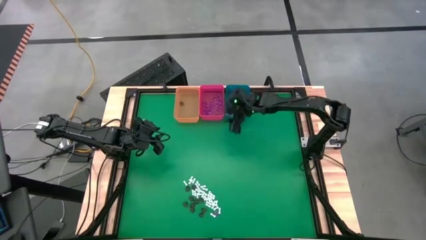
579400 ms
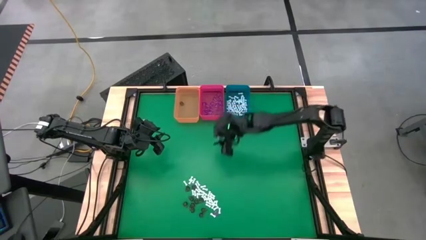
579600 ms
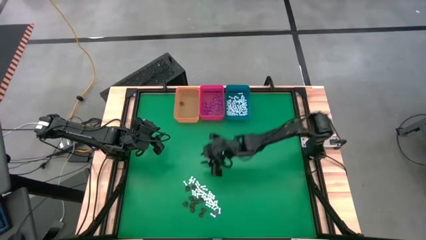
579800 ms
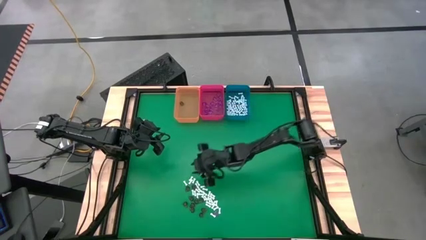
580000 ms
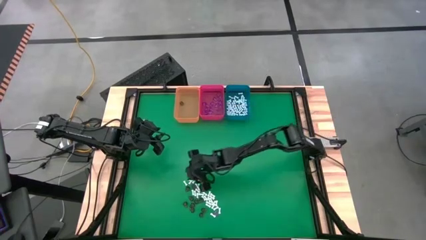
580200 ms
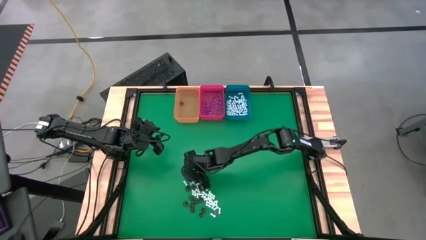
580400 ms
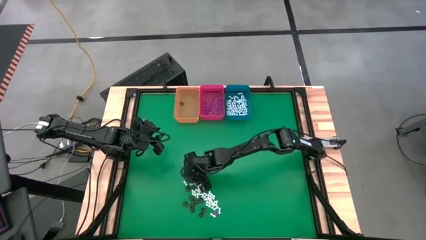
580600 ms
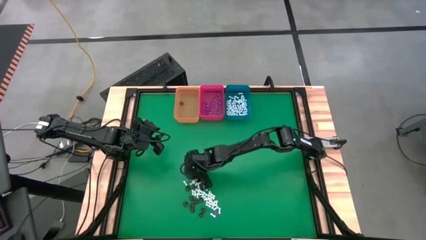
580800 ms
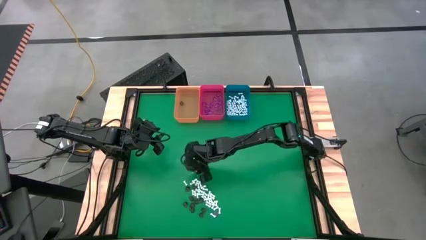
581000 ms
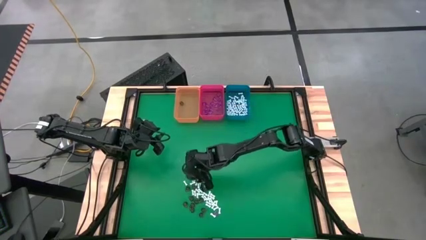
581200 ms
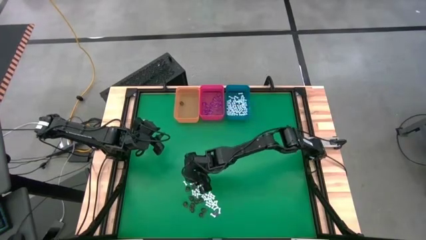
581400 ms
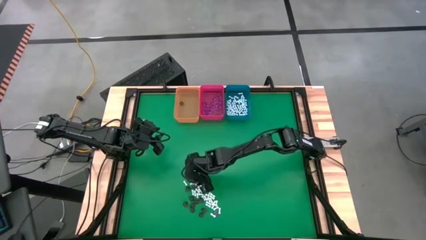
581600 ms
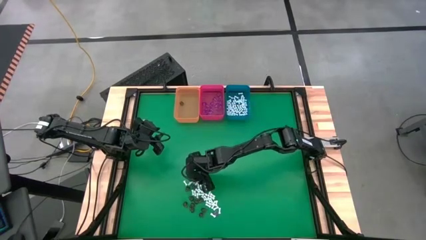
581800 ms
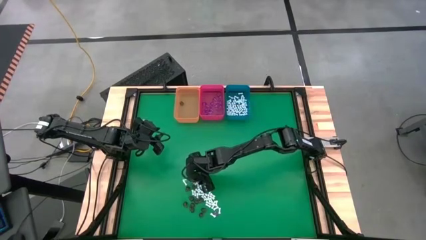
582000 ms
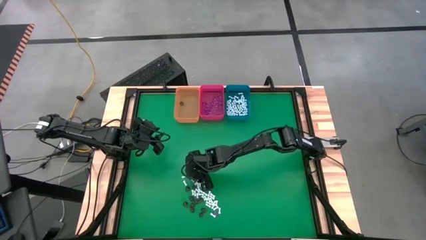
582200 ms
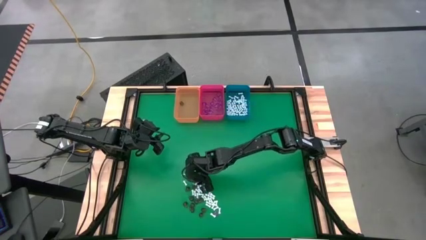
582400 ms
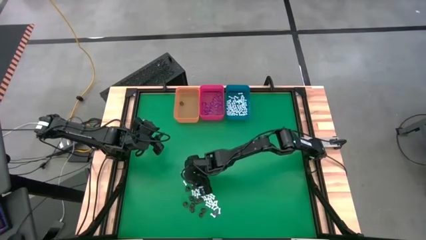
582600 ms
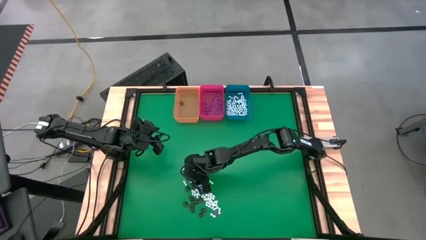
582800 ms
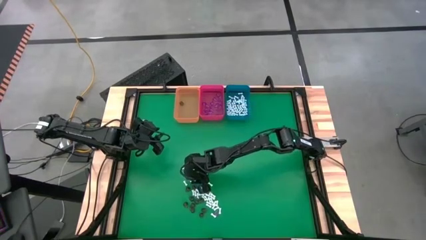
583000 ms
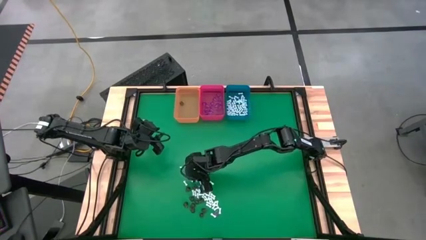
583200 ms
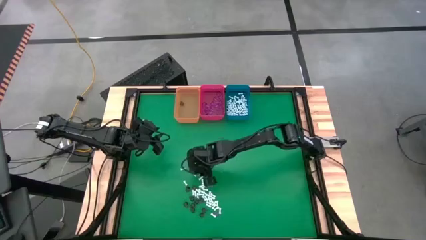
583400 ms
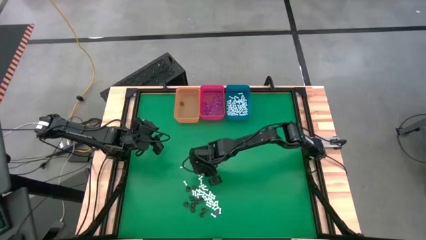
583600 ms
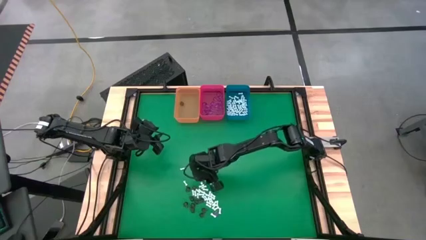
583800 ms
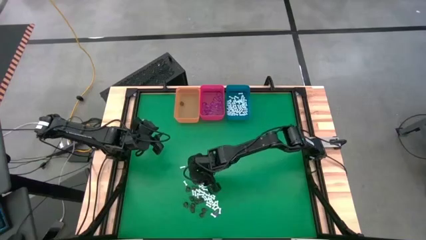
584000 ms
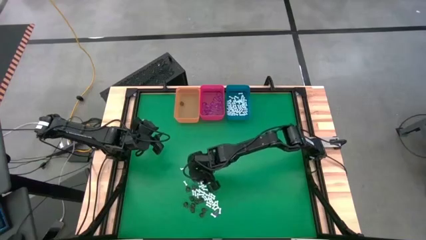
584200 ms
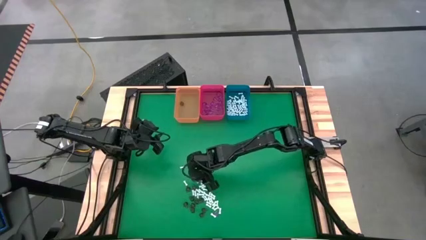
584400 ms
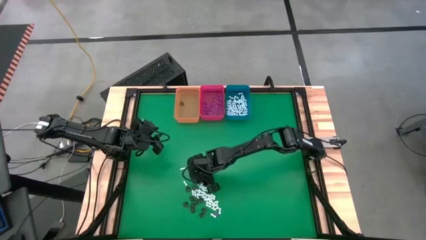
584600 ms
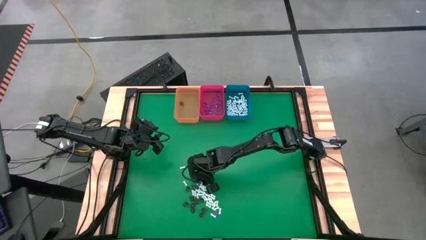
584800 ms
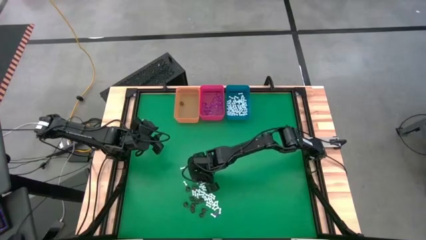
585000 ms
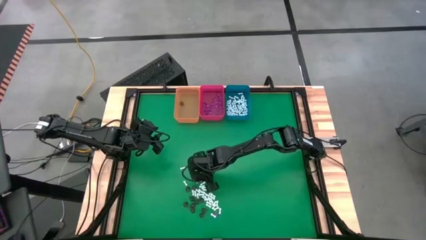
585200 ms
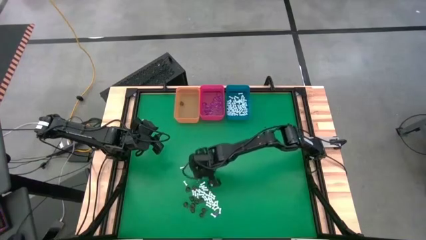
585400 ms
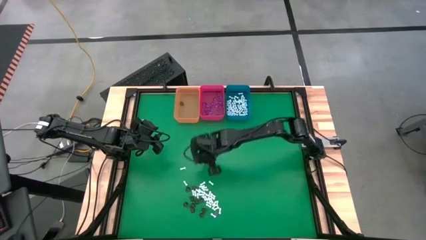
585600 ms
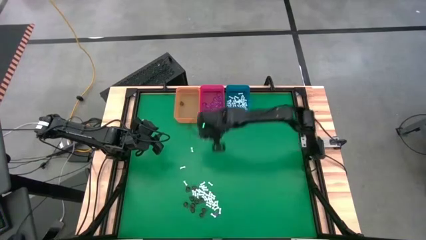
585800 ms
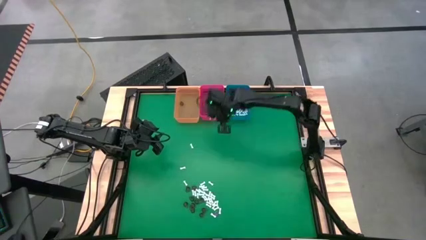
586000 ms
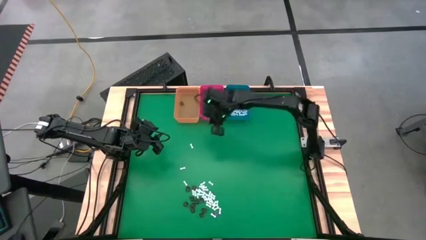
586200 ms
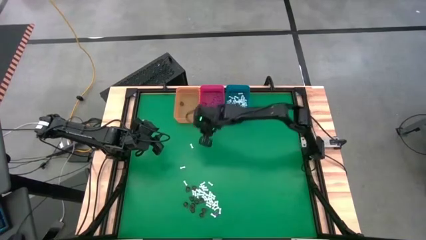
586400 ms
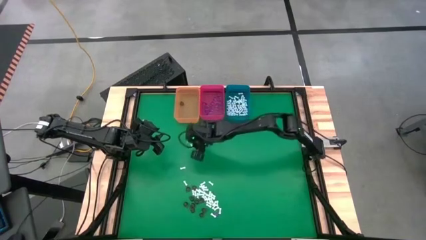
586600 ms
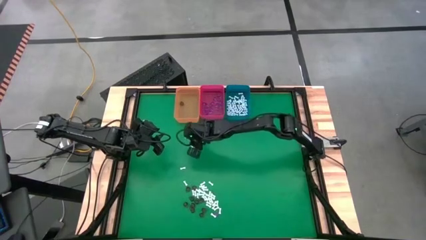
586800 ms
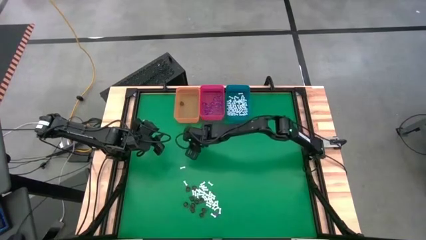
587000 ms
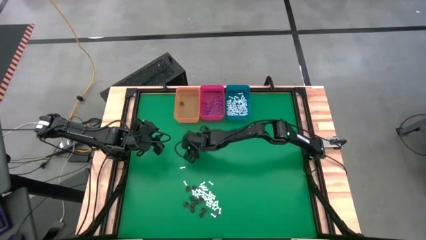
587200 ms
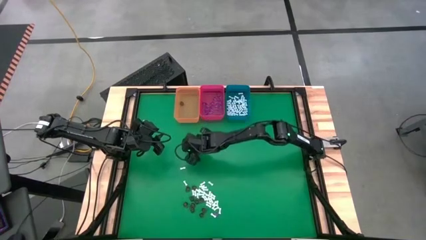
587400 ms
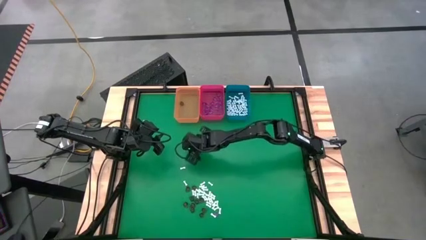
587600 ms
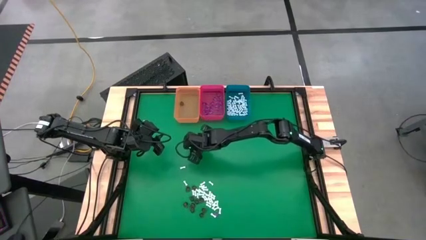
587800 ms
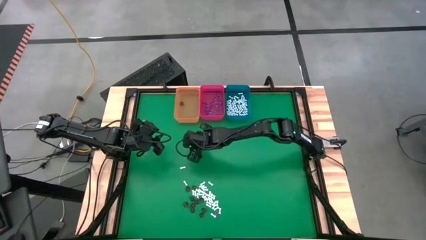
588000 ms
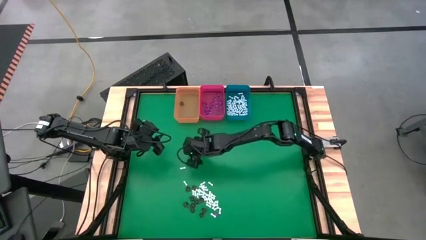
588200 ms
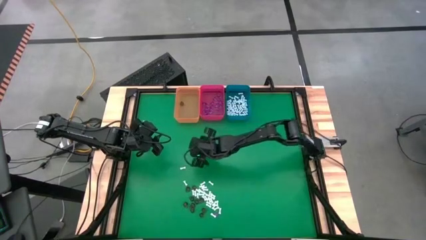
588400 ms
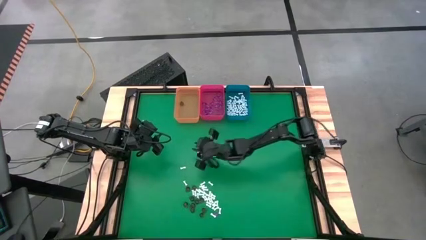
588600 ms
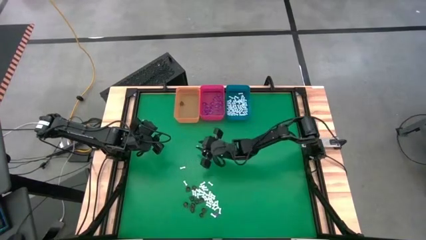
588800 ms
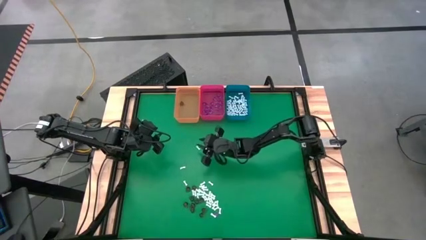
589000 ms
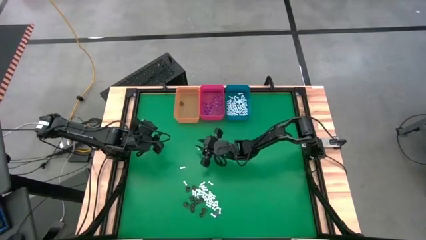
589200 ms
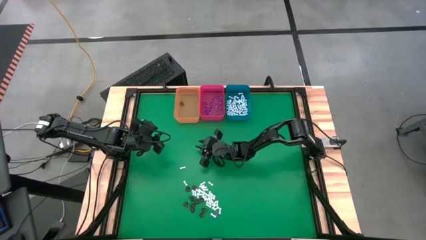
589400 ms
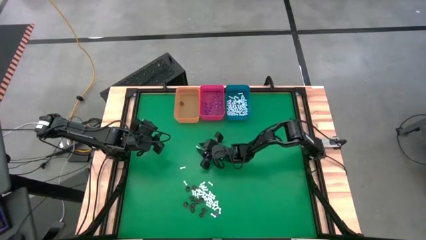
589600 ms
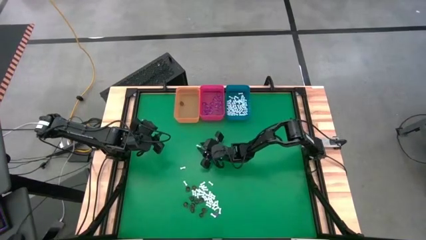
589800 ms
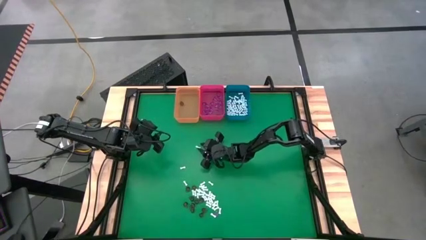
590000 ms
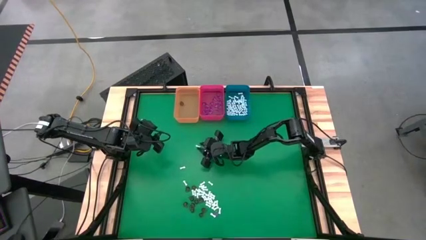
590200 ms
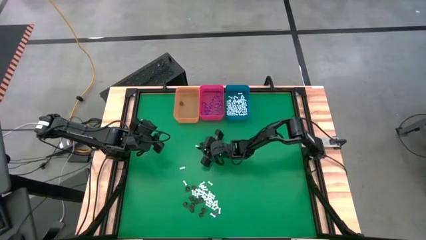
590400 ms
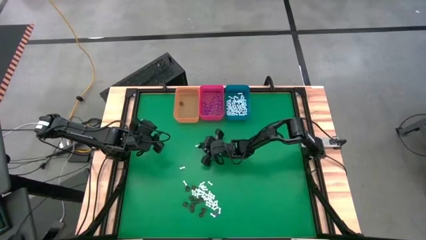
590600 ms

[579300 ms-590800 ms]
Task: Sort Halloween decoration
Put the white bone toy into the blue bin

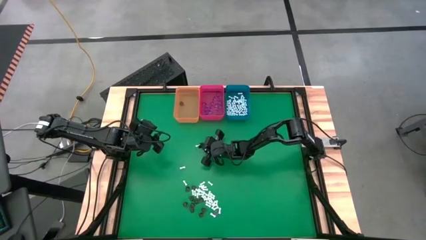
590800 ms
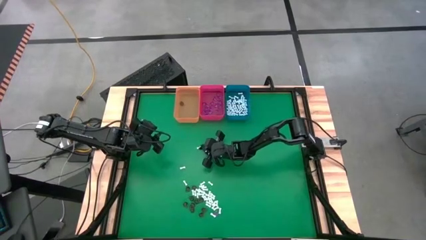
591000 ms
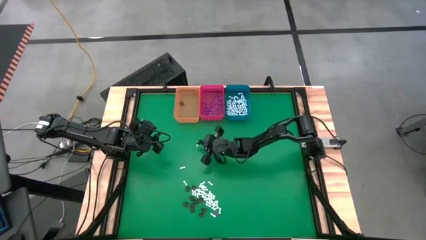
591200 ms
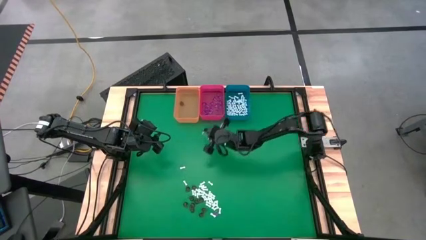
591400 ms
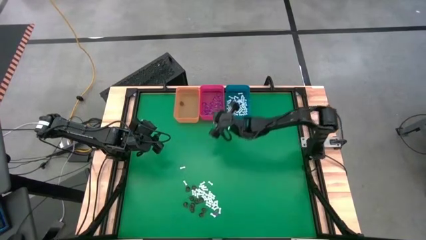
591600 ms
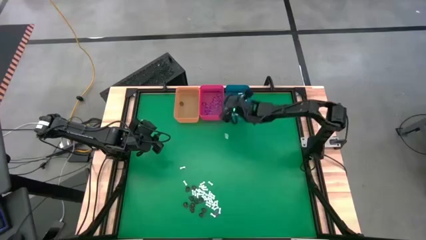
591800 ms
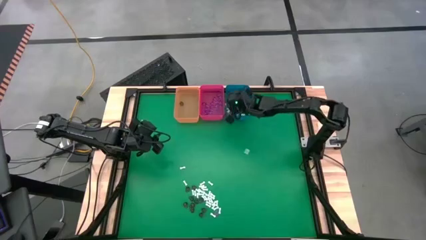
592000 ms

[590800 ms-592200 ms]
Put the white bone toy into the blue bin

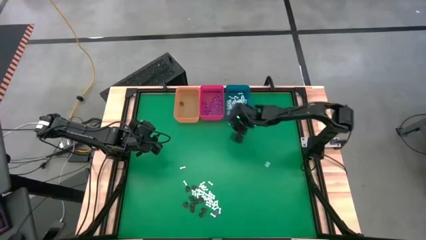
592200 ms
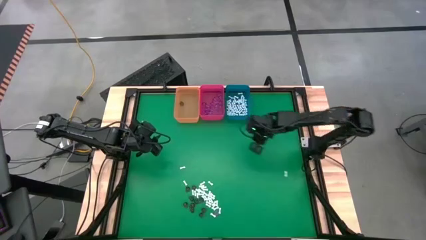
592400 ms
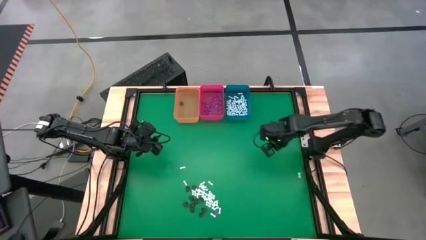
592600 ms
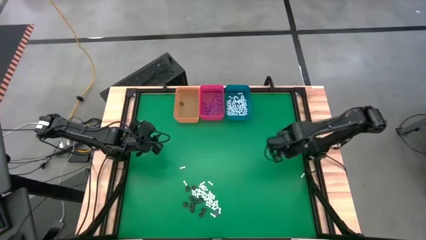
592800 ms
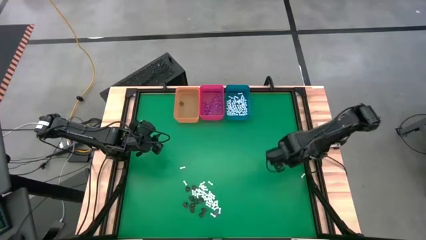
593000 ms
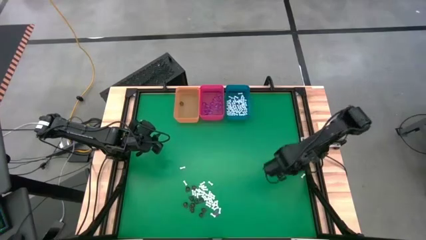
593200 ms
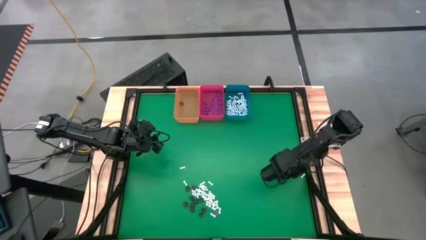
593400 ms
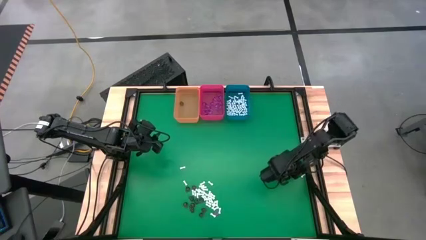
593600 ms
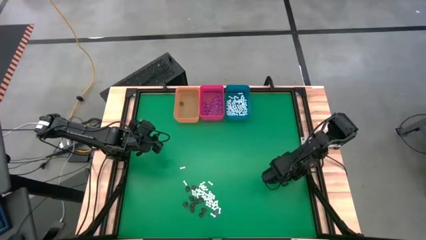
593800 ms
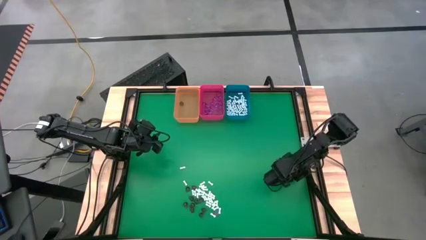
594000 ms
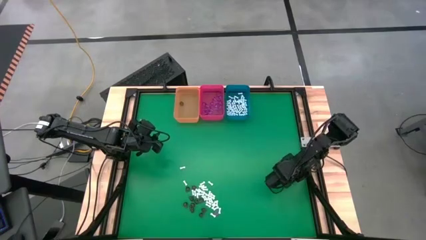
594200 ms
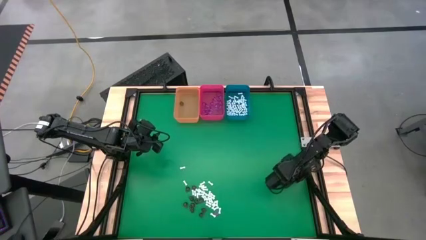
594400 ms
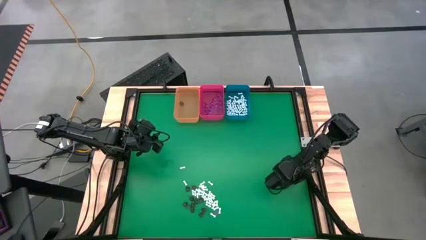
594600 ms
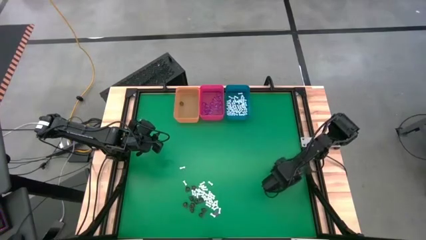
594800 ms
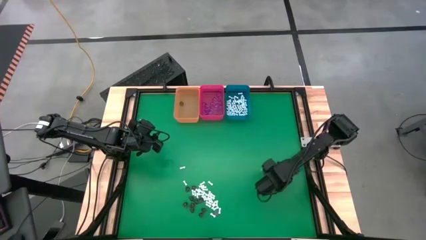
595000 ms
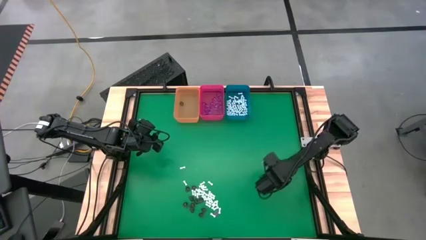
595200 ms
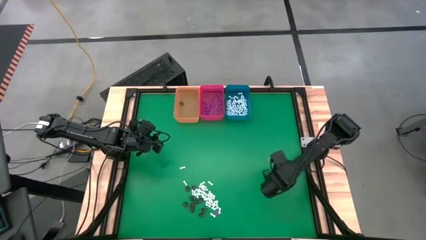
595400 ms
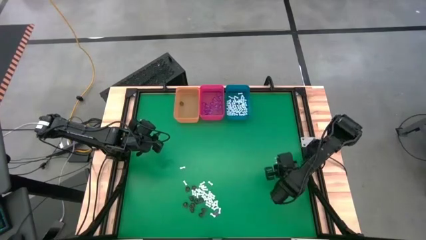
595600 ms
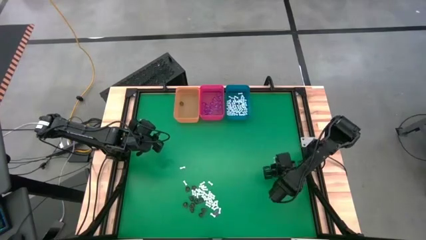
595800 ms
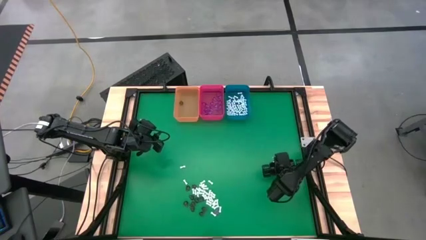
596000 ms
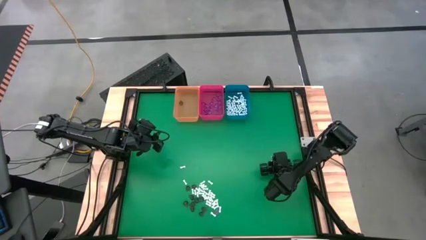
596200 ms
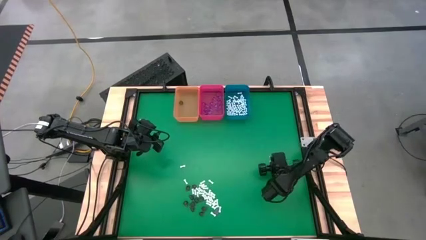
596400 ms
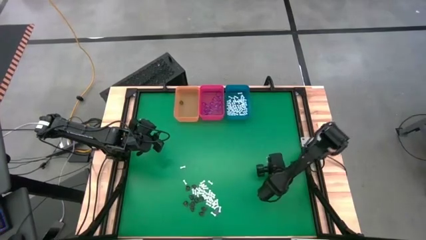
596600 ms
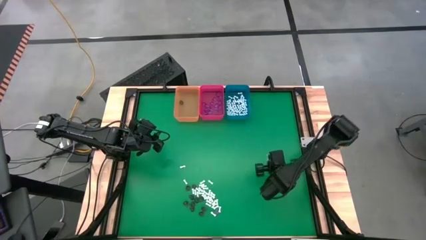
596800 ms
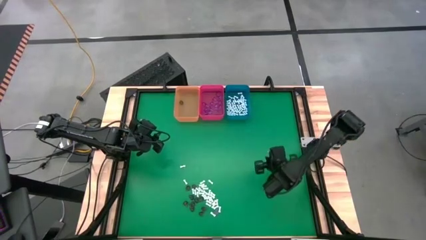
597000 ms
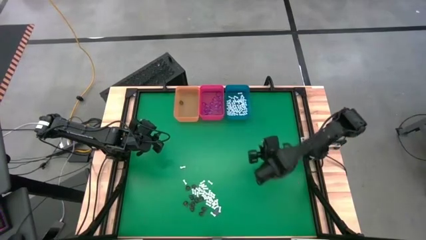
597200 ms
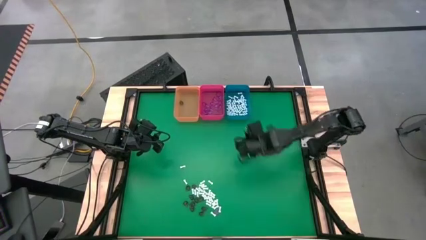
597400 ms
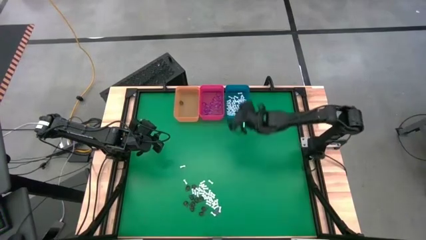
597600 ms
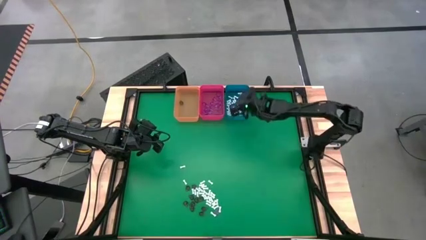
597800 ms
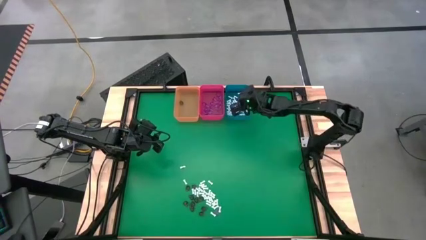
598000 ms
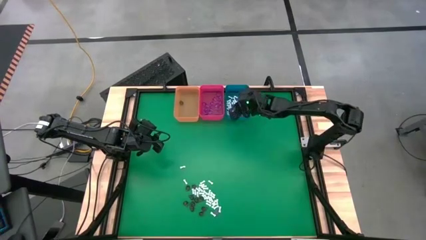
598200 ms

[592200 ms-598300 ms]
Put the white bone toy into the blue bin
